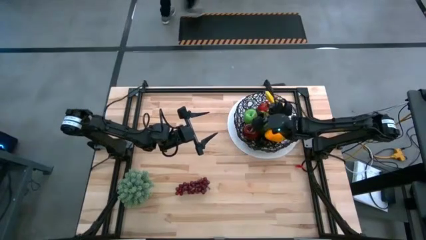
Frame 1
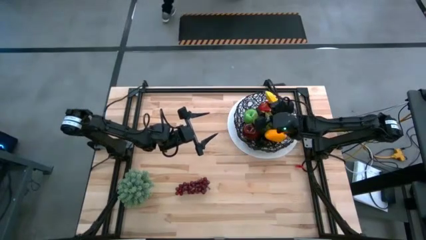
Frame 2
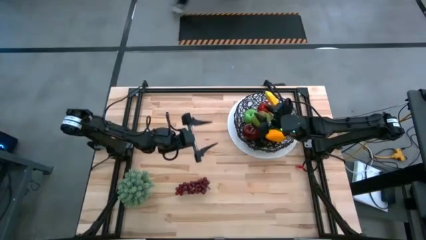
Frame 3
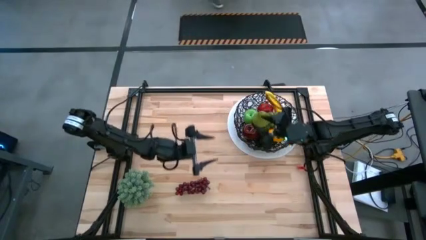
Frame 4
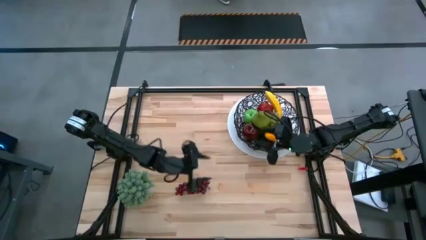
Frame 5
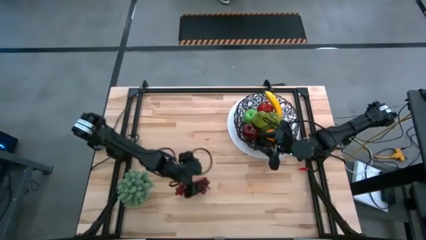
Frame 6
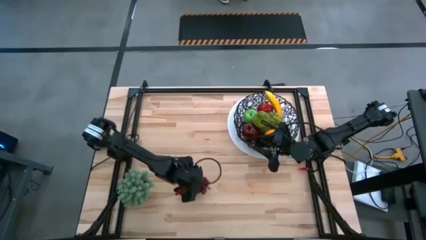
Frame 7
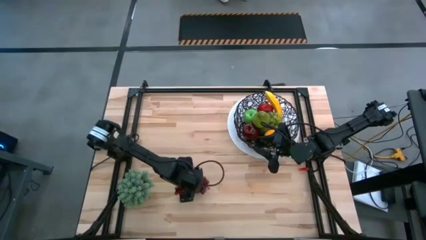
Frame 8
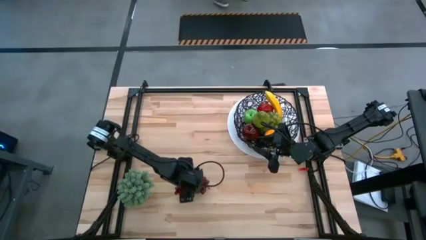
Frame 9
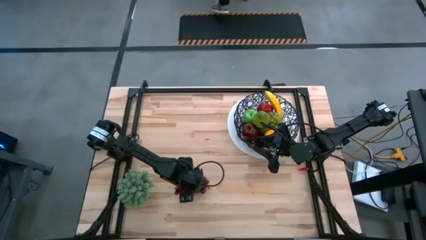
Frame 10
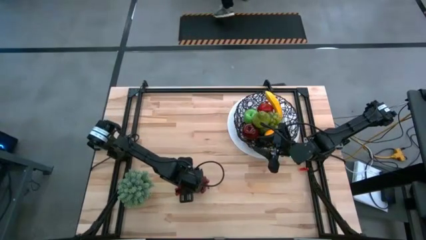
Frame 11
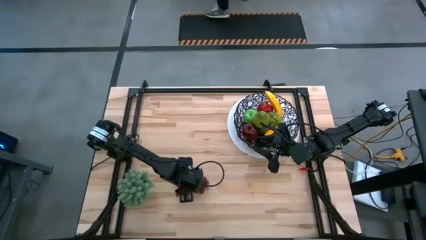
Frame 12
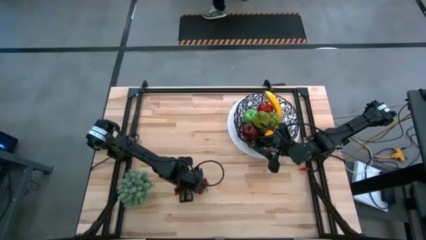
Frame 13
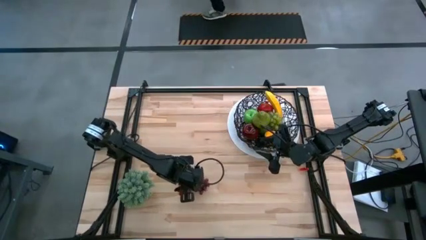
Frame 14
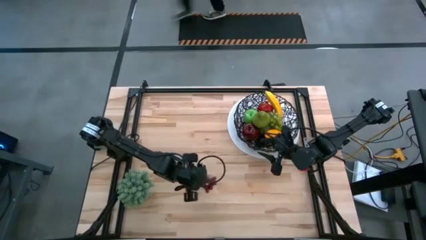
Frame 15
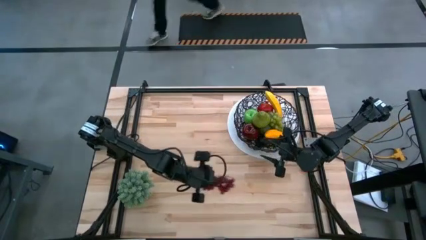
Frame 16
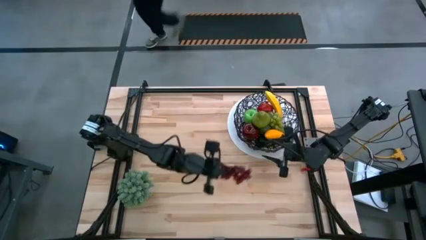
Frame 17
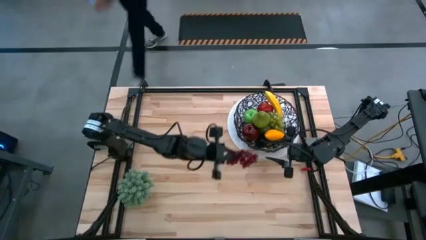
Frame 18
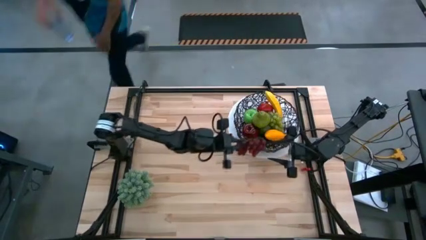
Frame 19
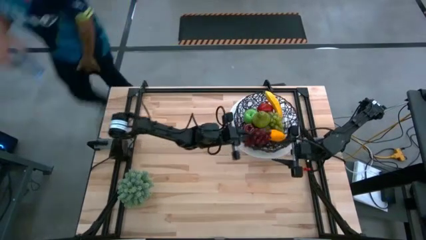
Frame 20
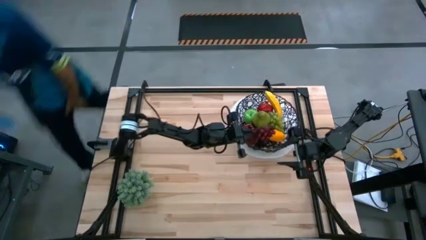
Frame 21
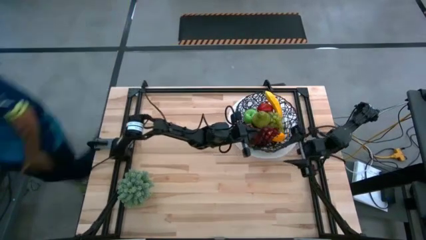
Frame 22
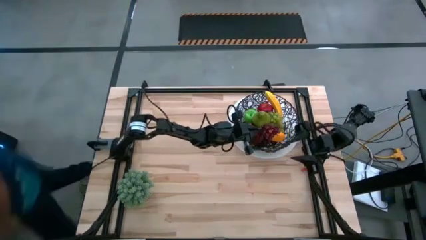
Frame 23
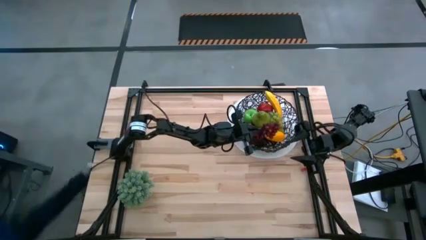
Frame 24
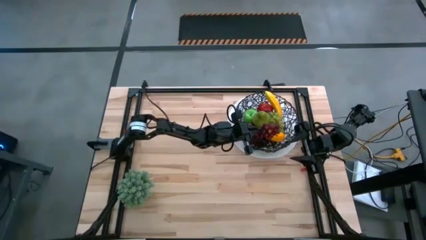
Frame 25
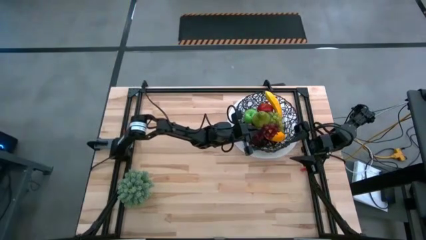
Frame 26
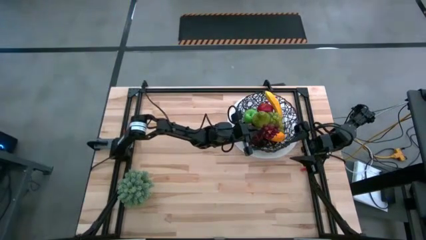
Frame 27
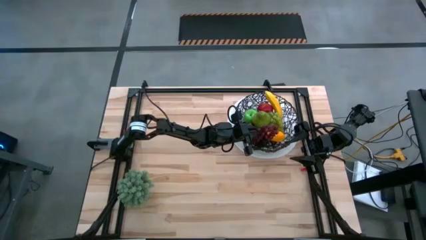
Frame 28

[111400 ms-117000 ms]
Task: Build produce basket
Put the purple grapes into the wire basket

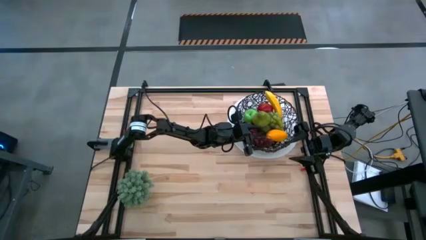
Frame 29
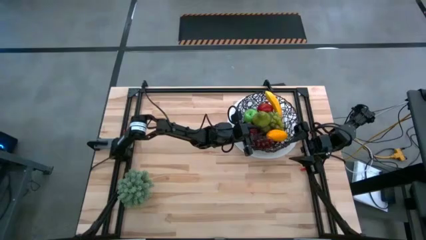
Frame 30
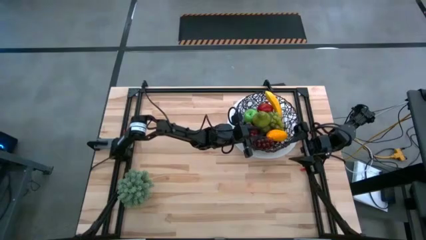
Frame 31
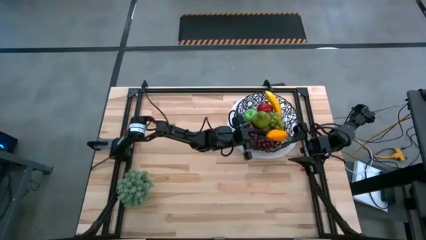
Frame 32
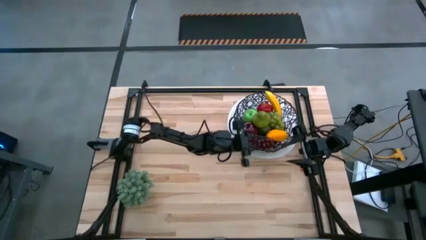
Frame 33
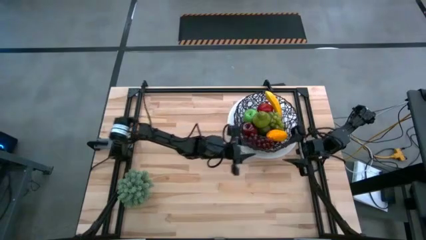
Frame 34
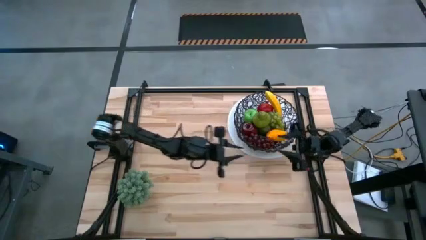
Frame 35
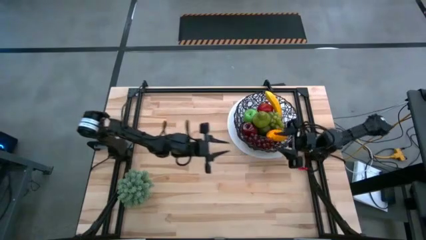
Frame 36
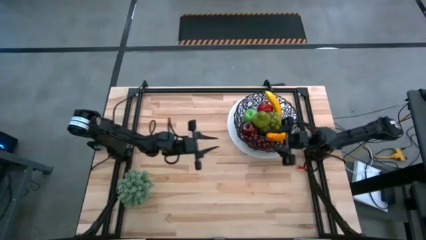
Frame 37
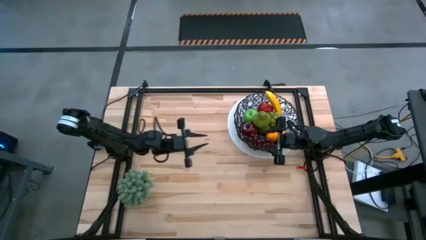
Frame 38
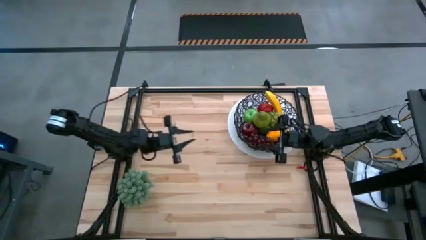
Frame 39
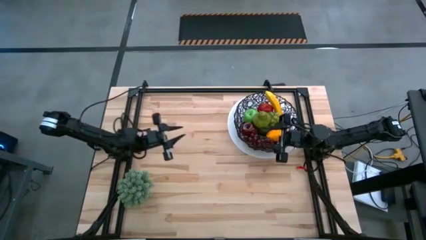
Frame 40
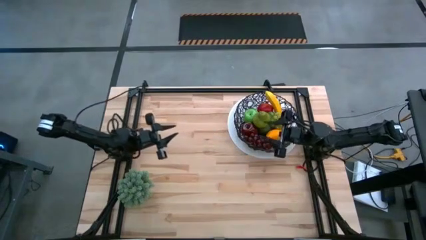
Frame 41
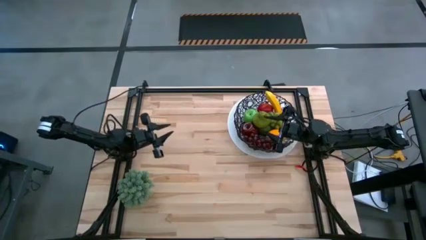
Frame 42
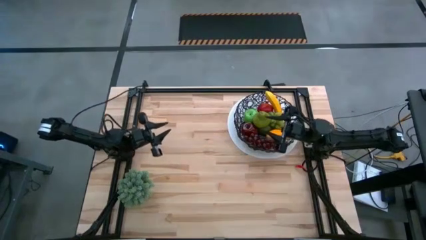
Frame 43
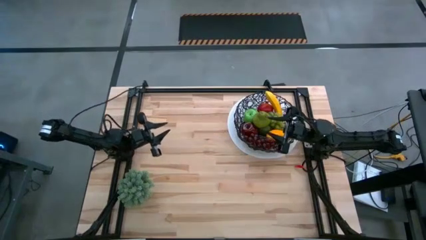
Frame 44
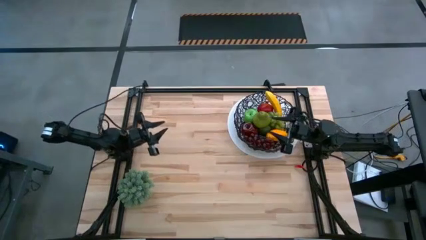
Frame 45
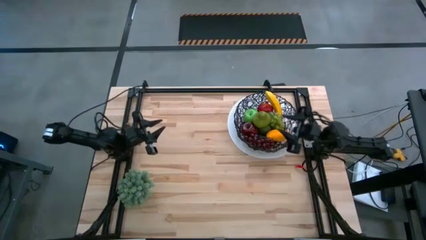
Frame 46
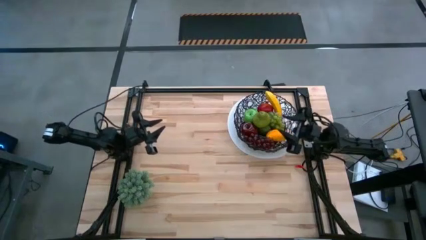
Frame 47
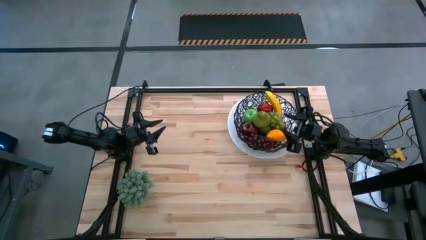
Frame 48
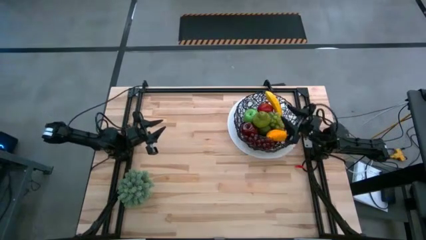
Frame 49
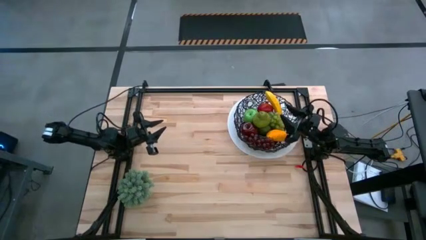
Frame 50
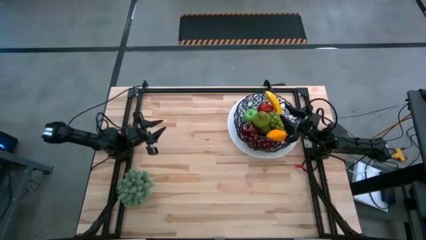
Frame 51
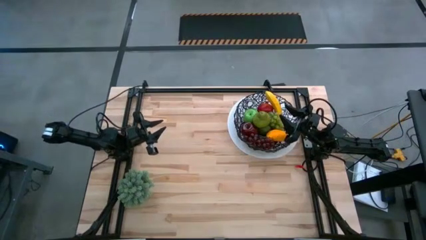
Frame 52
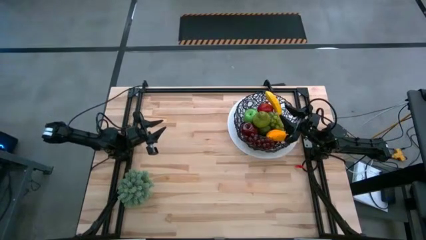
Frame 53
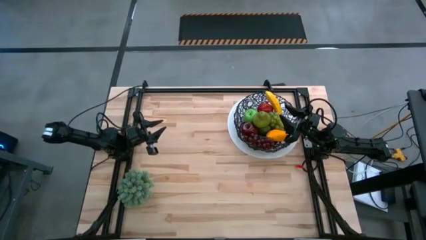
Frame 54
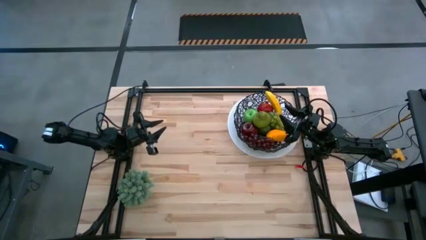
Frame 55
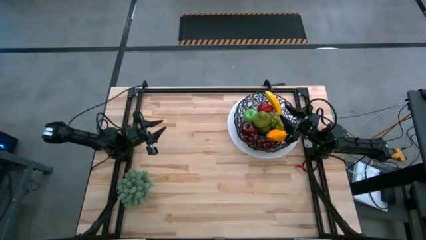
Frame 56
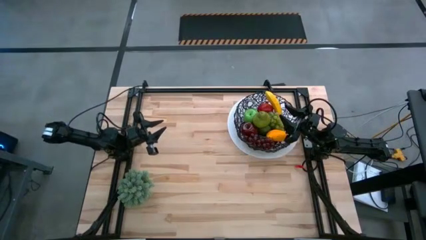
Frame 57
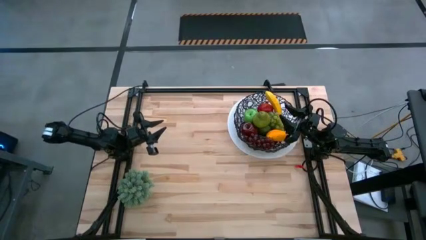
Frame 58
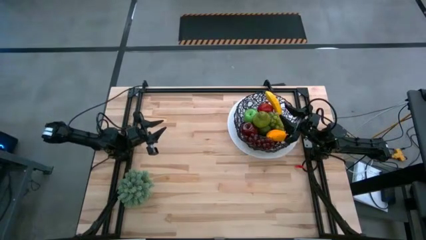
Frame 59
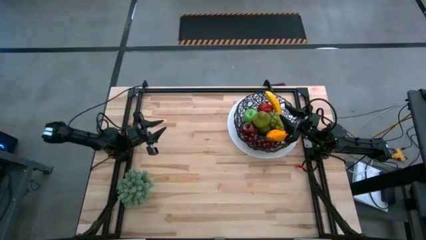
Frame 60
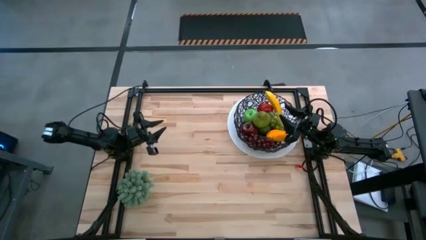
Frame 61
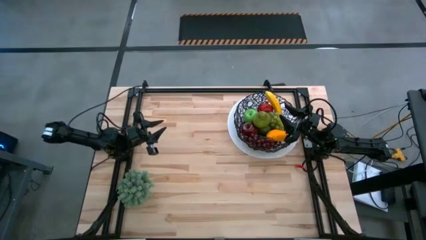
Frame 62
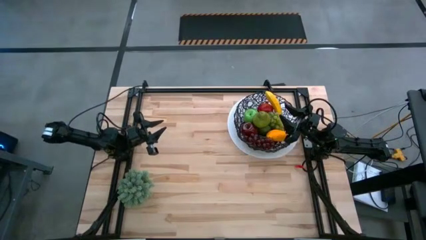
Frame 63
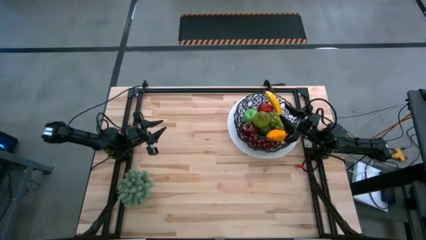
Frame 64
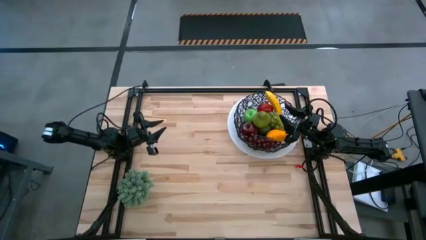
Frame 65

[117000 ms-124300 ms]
Return to Home Position

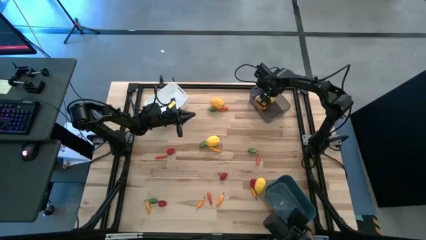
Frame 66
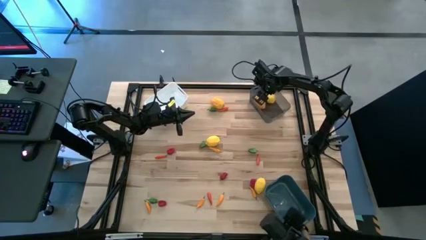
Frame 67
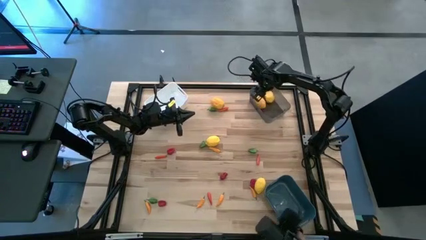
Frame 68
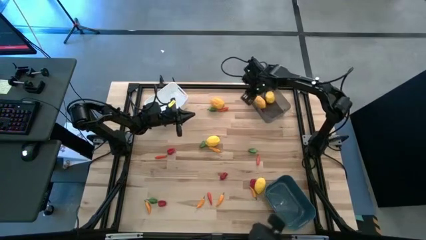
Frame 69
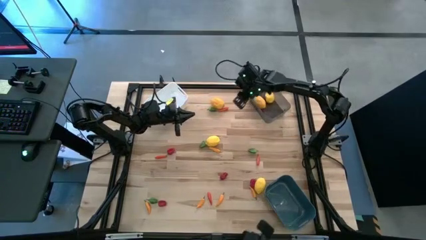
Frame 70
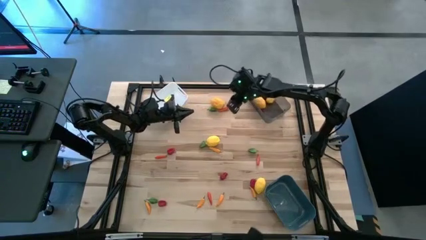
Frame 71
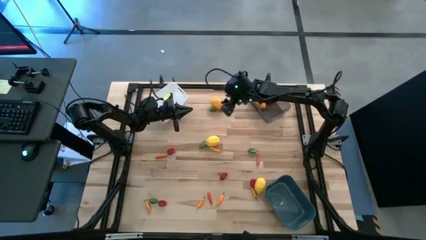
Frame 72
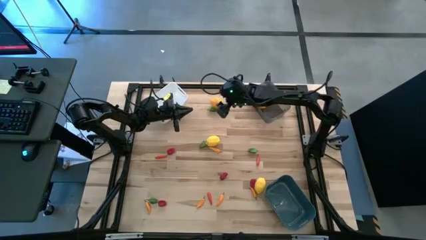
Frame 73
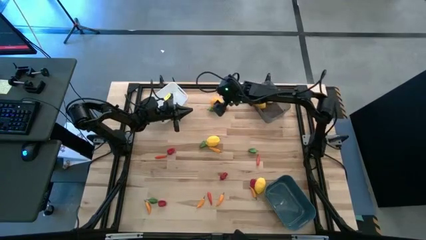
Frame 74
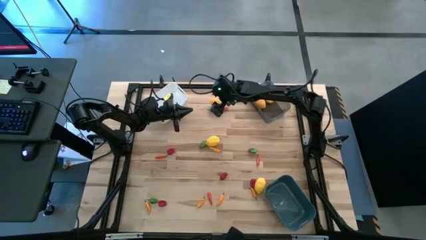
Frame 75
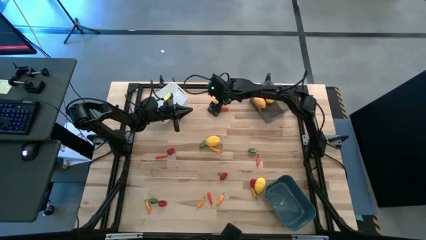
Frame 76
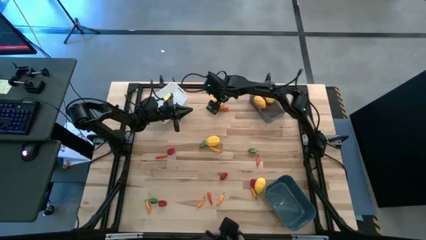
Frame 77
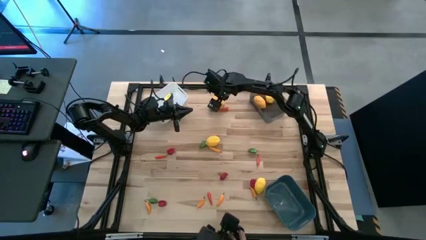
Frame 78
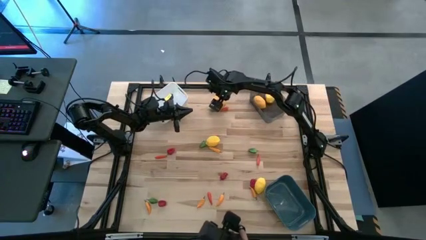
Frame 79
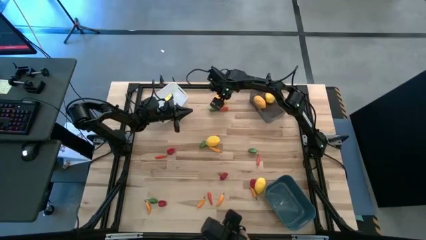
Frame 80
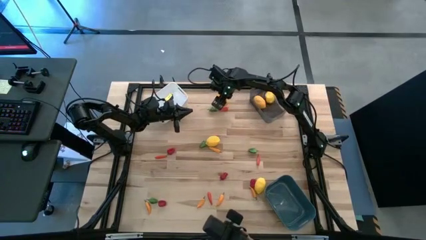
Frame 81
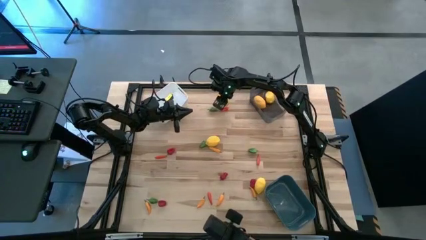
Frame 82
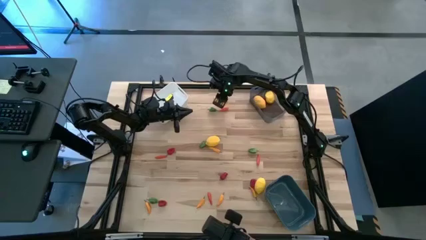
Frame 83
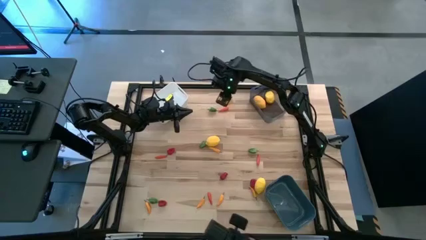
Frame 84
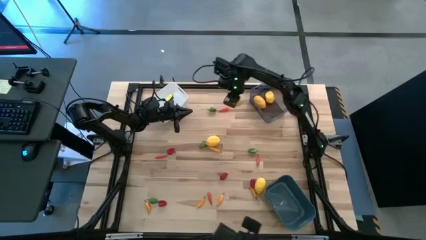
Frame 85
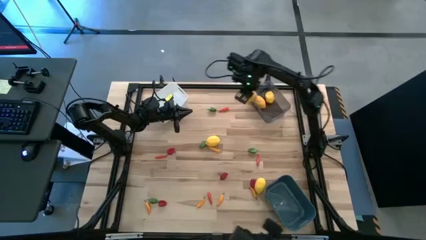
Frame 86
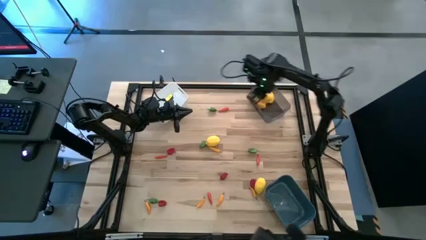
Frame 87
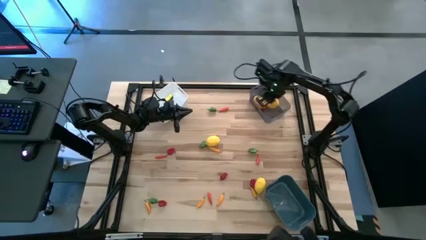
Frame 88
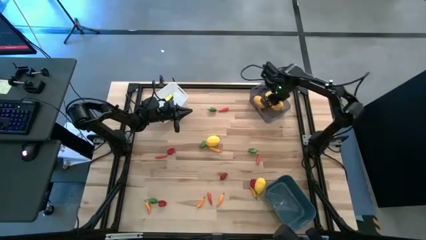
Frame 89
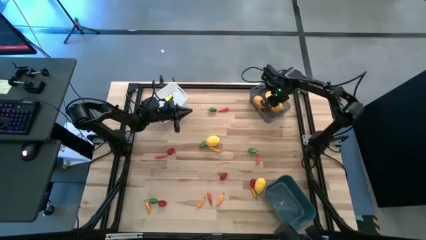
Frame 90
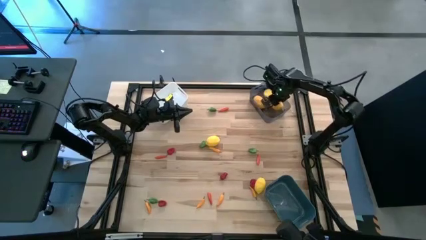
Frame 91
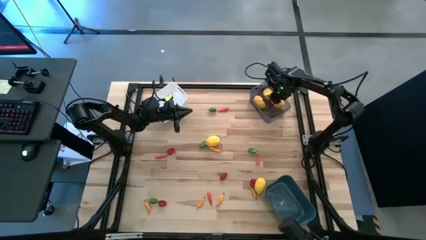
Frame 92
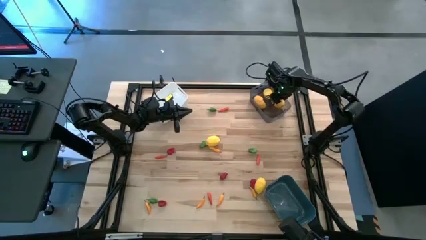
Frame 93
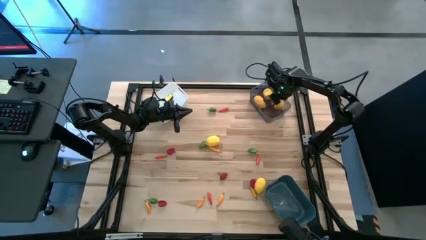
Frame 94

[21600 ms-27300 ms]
Task: Sort produce into baskets
Put the lemon into the black bin
